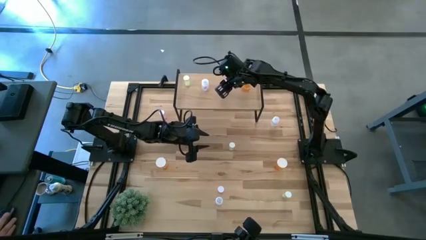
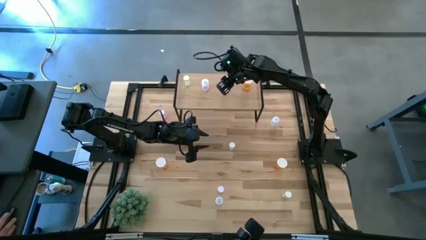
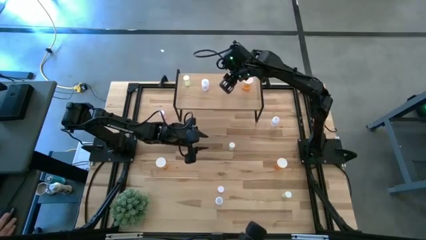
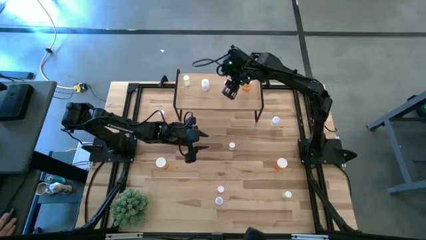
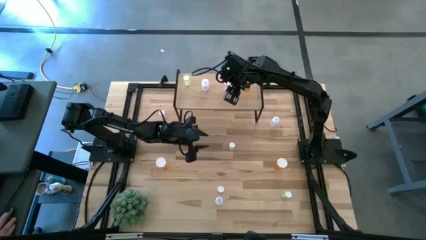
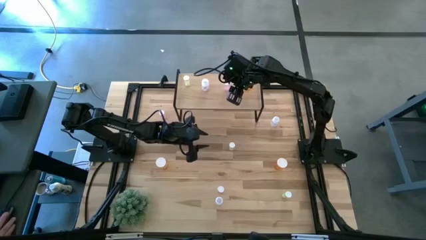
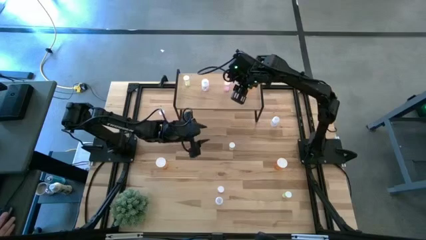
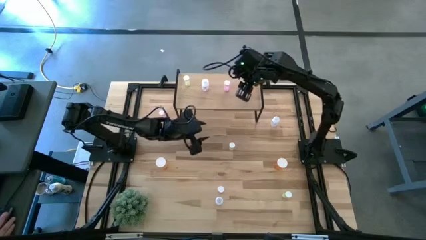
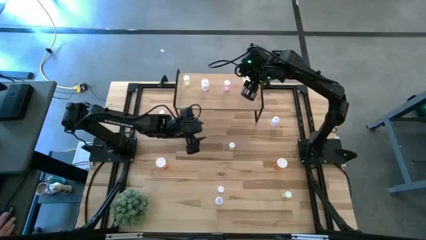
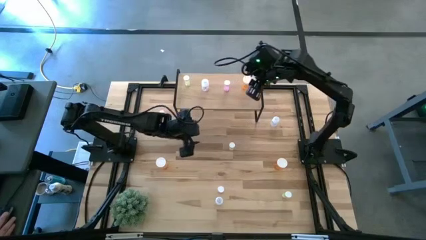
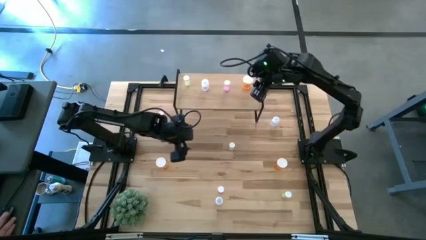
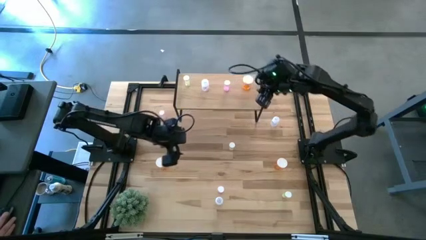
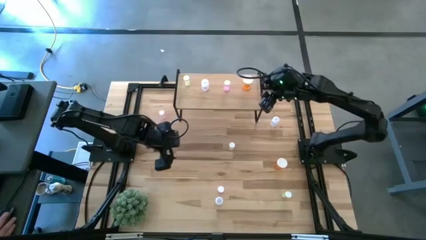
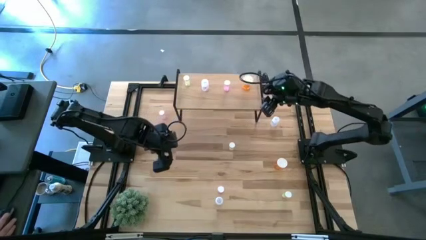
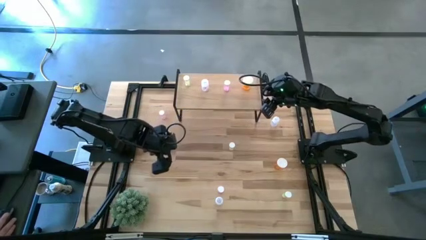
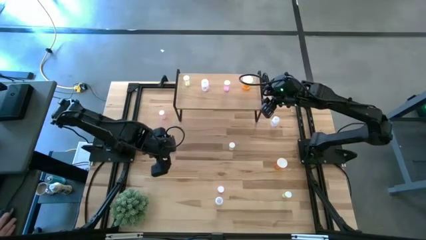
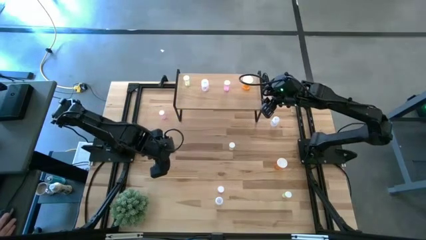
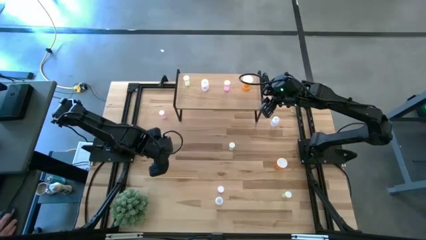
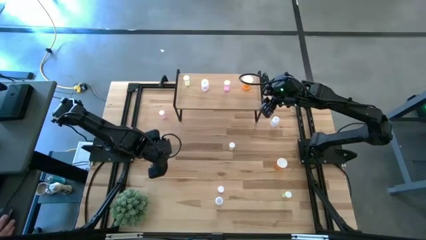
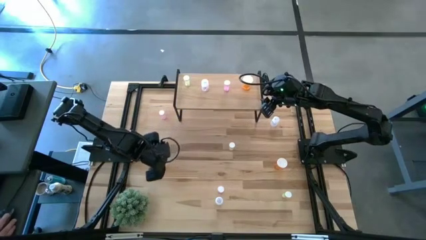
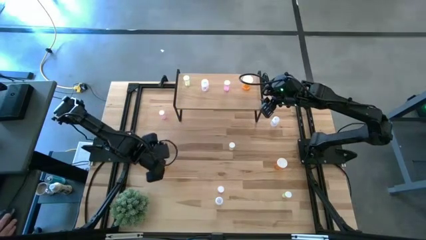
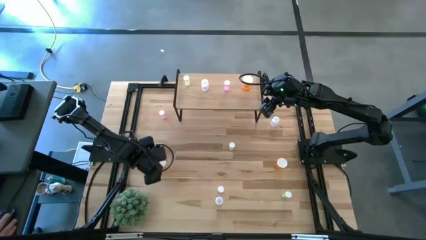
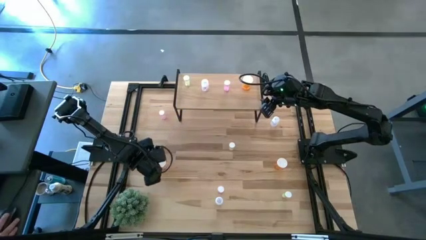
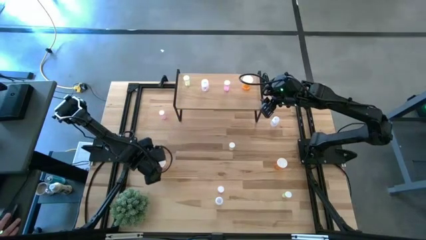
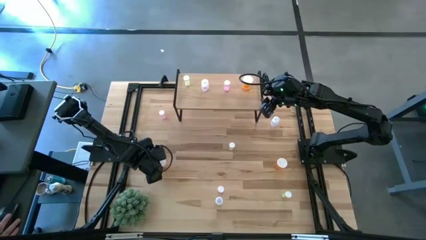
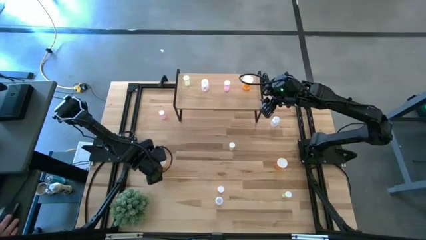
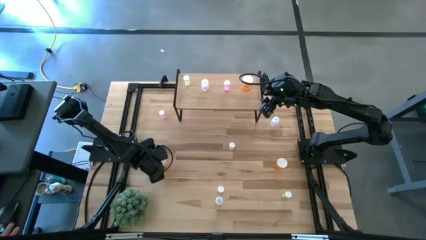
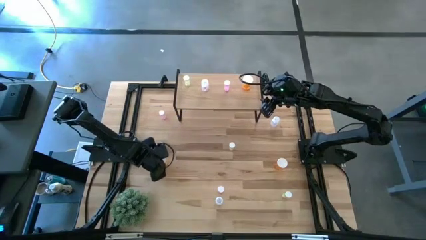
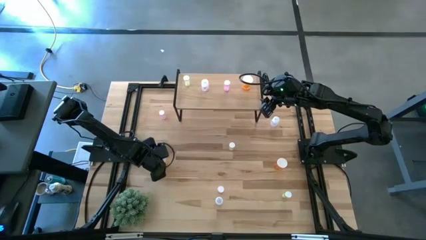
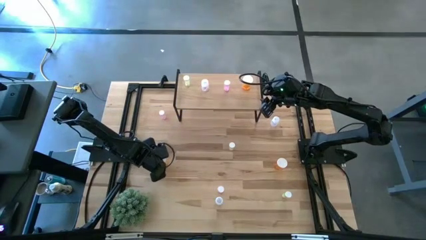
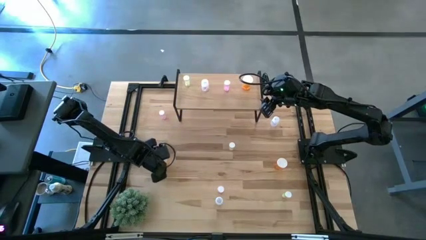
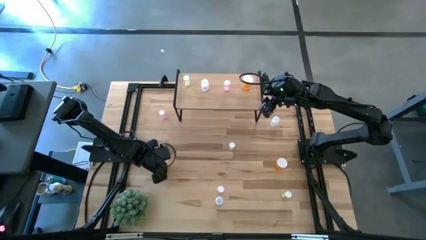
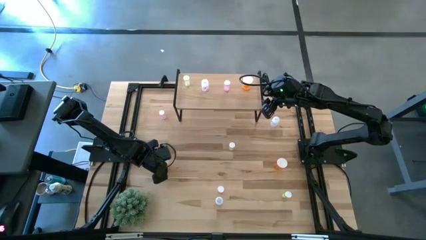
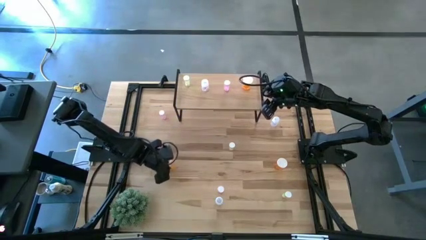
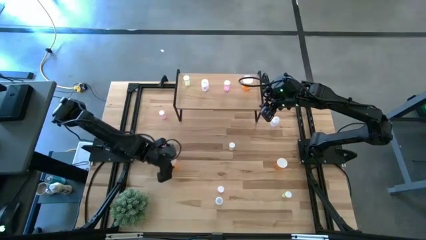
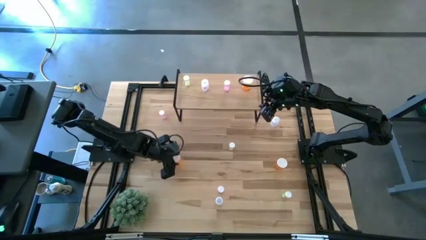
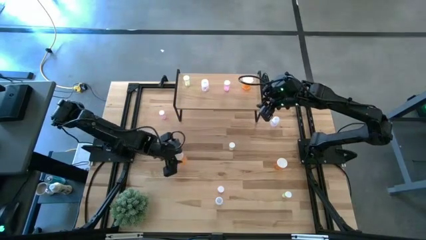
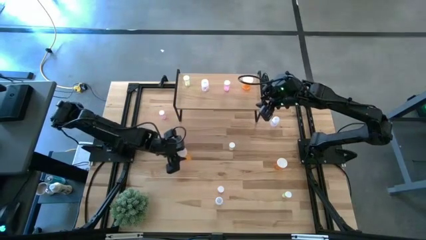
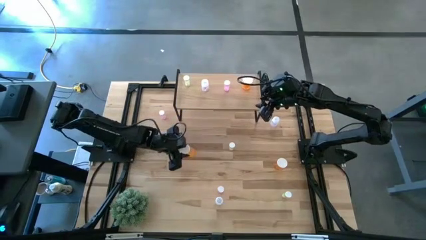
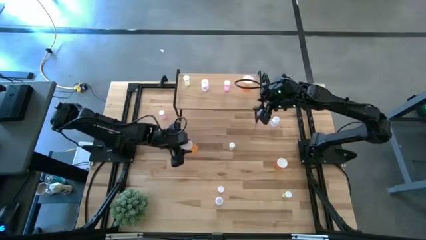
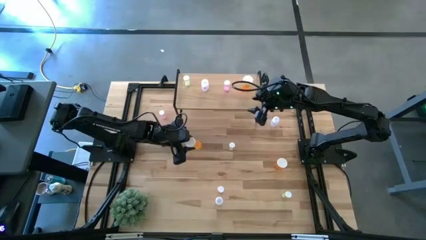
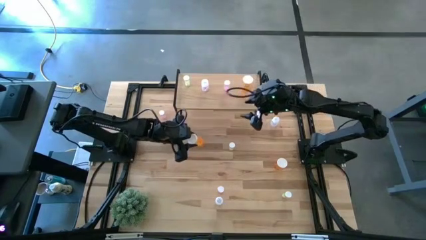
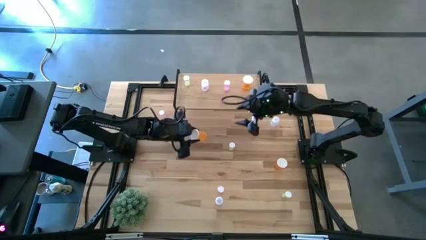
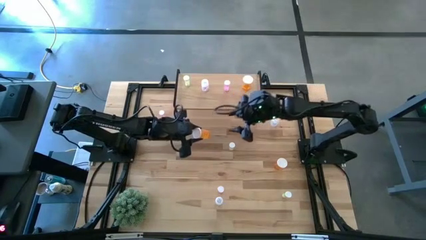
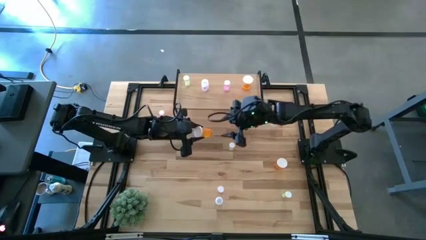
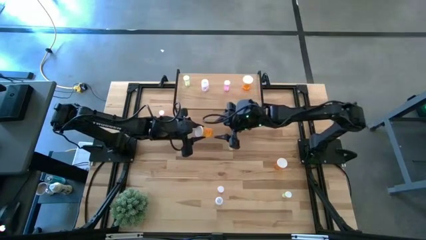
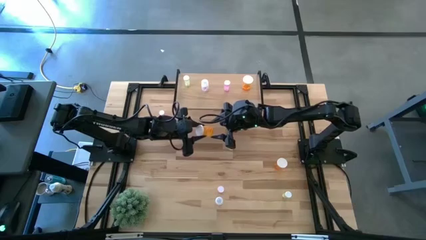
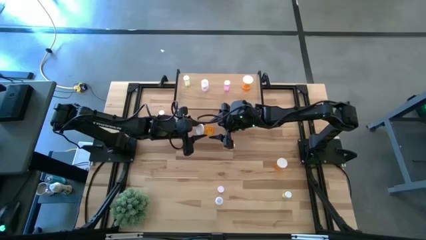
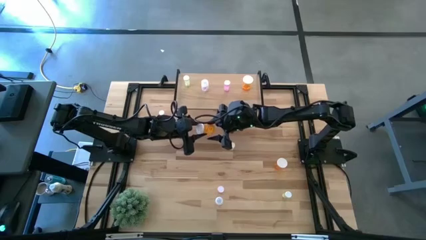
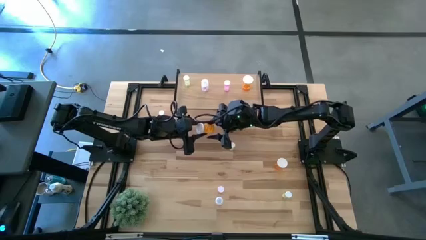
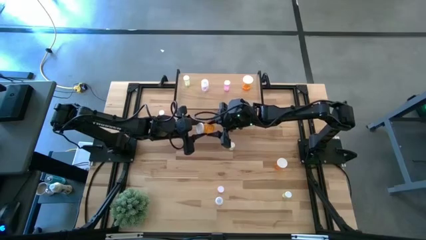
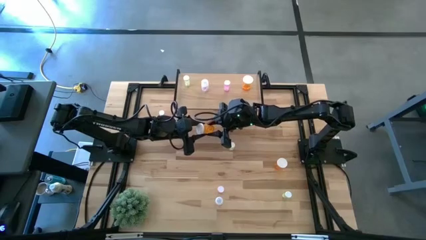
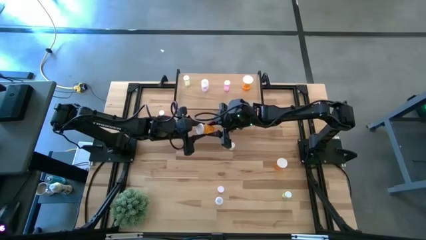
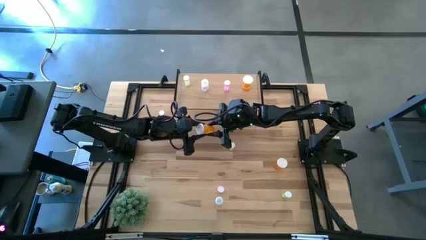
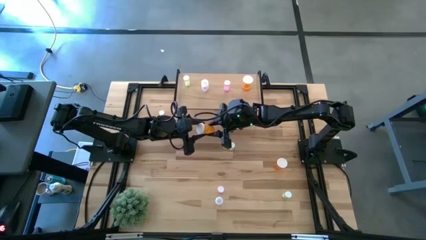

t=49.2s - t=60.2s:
Task: Pick and place medicine bottles onto shelf by color
Put the left orange pill bottle aligned with the other orange pill bottle on the shelf

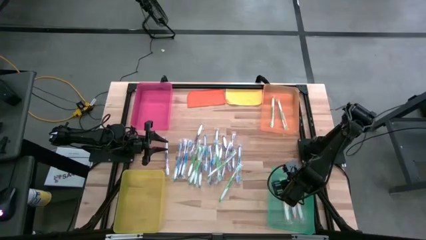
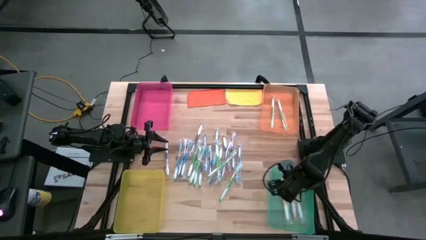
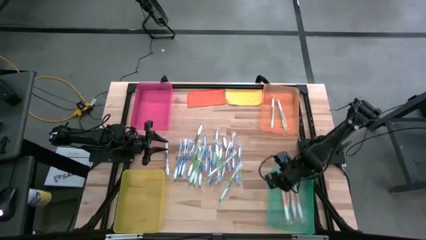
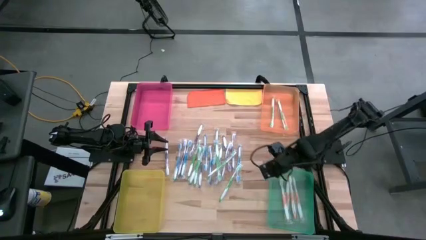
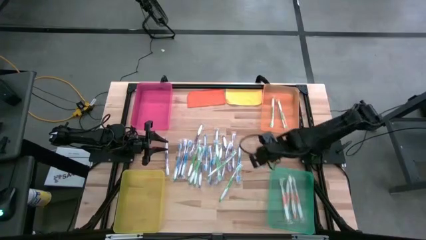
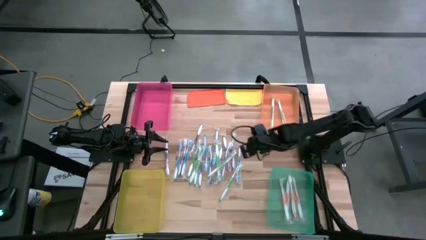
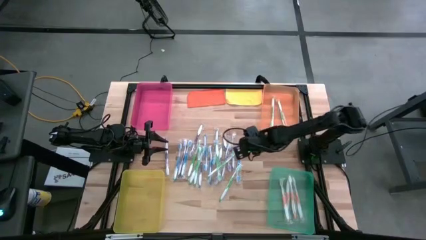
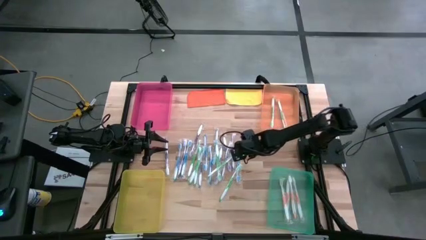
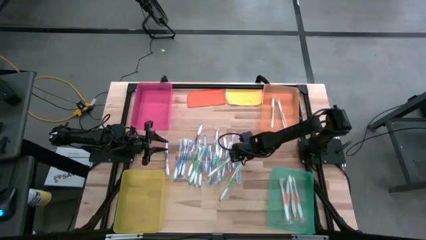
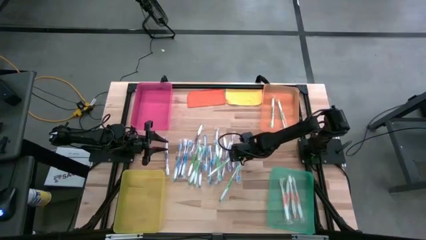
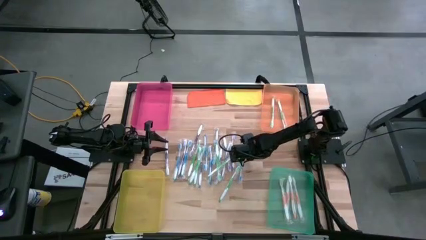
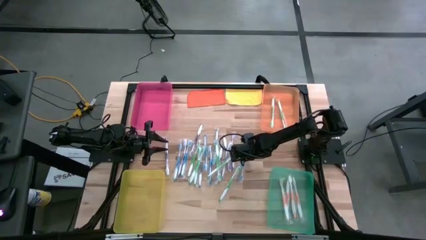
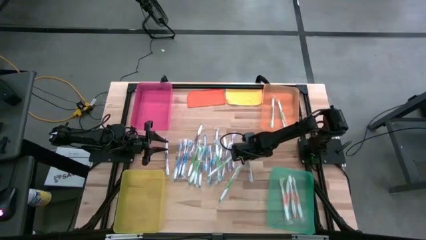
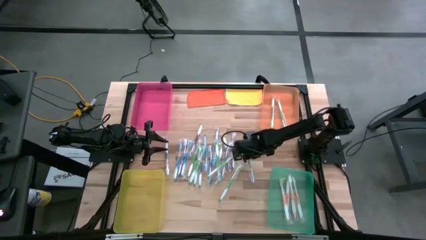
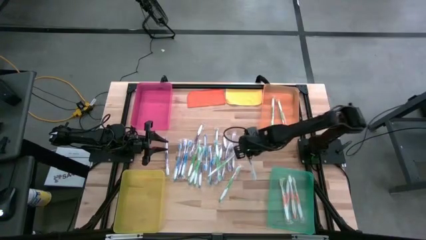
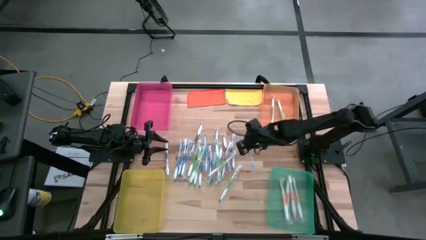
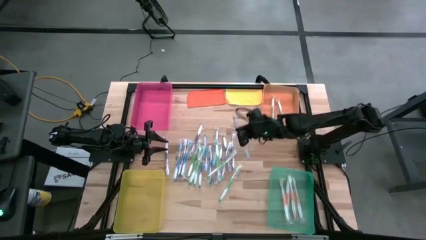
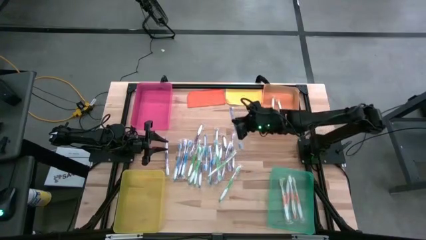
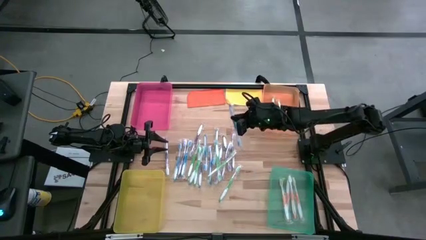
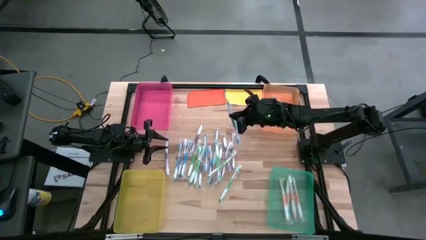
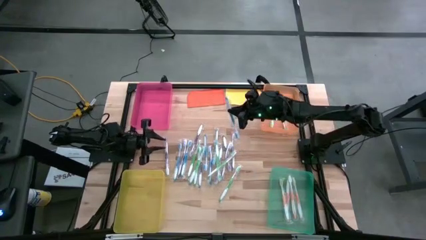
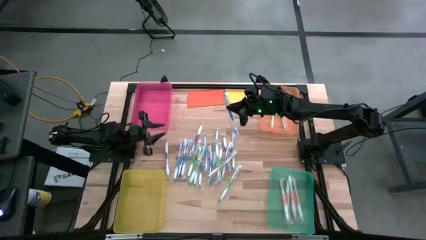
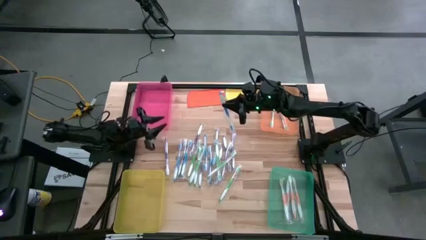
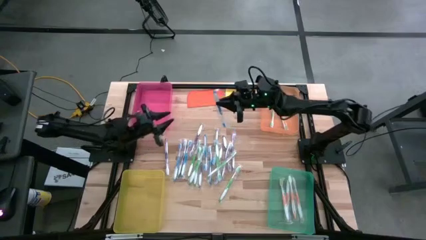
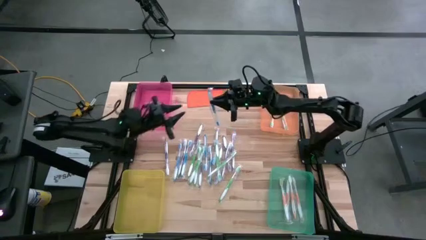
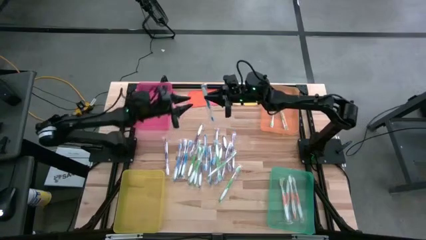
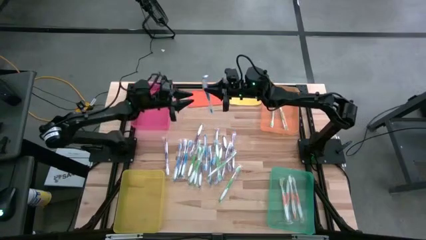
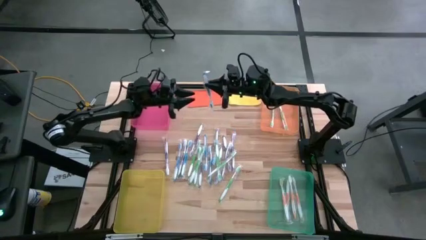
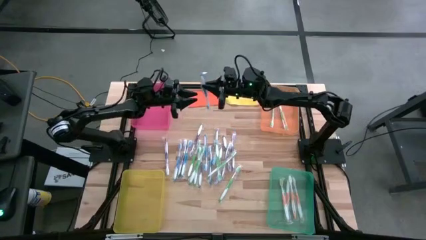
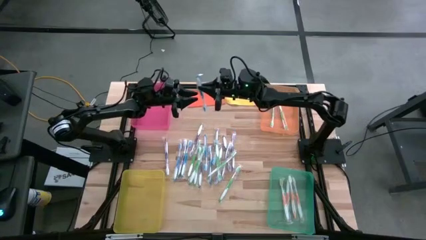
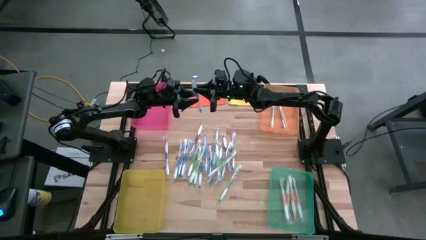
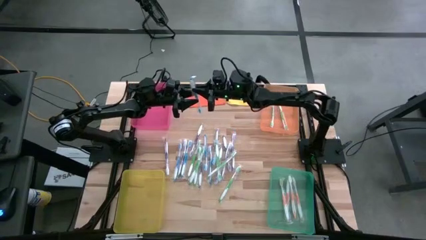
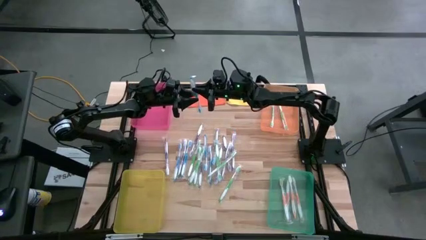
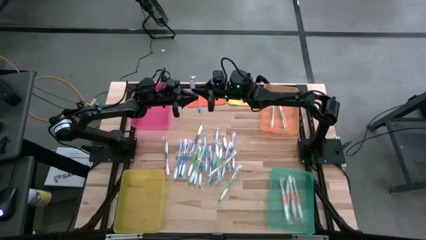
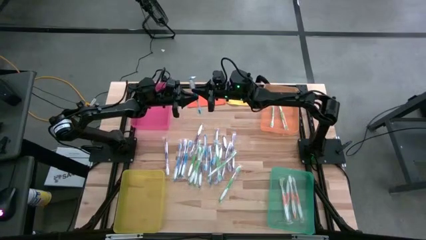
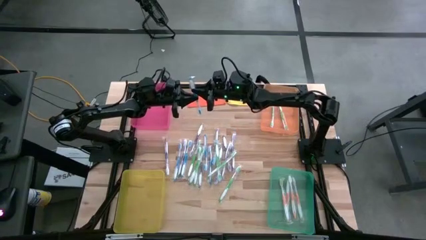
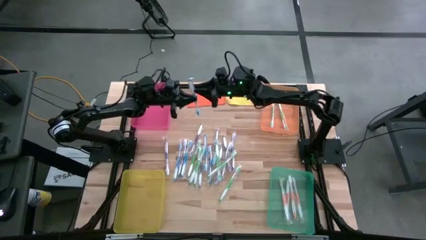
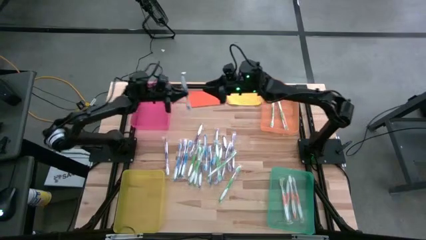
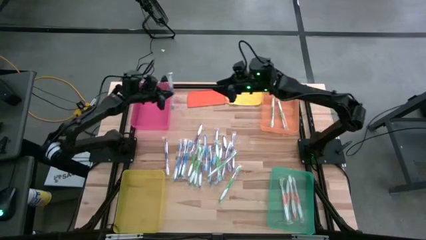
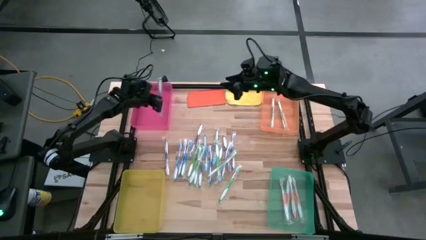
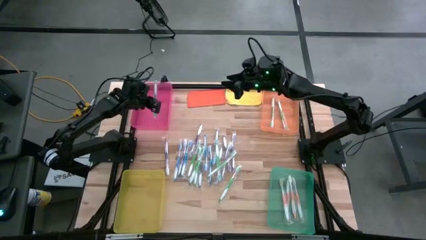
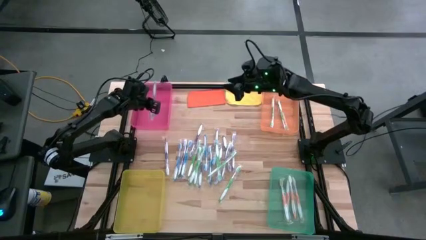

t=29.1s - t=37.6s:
Task: Pick & Place Toothbrushes
Put the blue toothbrush into the red bin
